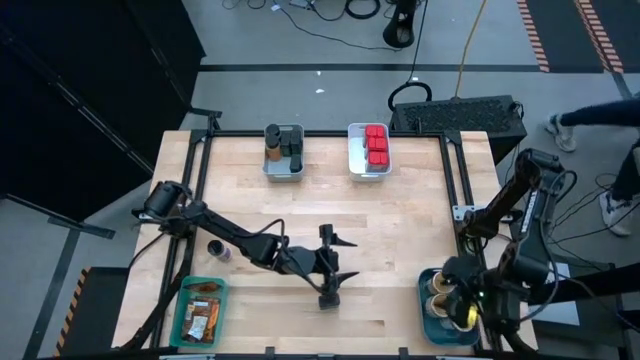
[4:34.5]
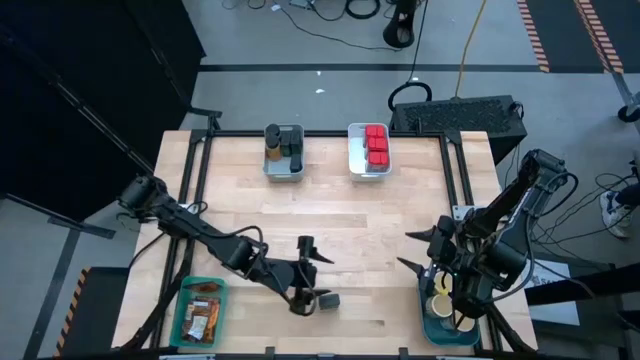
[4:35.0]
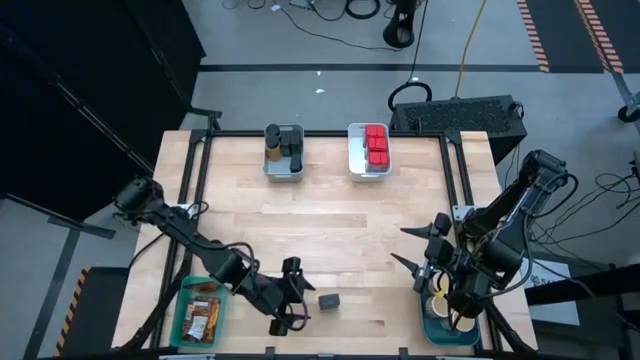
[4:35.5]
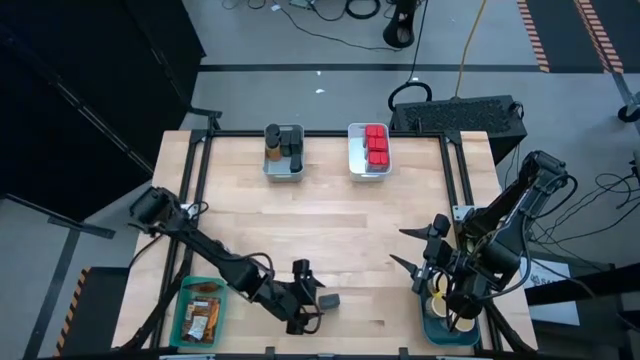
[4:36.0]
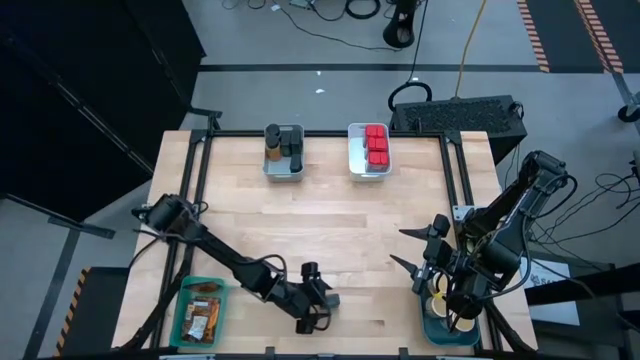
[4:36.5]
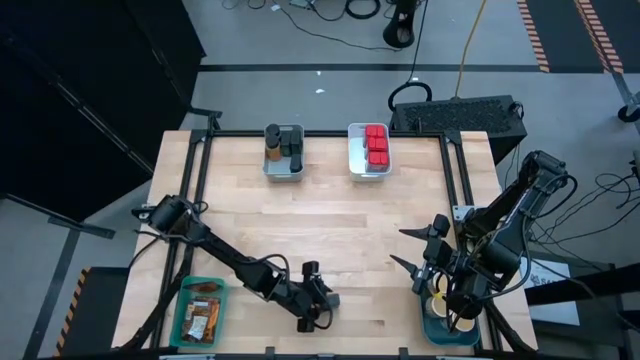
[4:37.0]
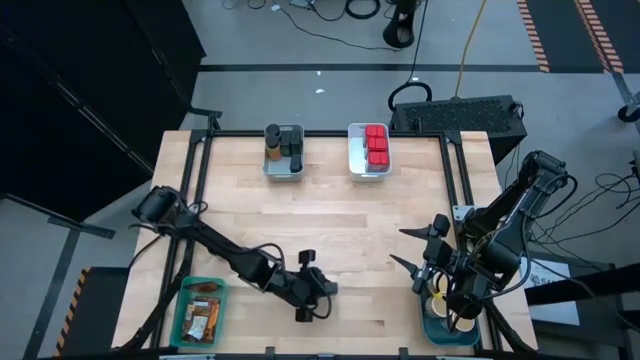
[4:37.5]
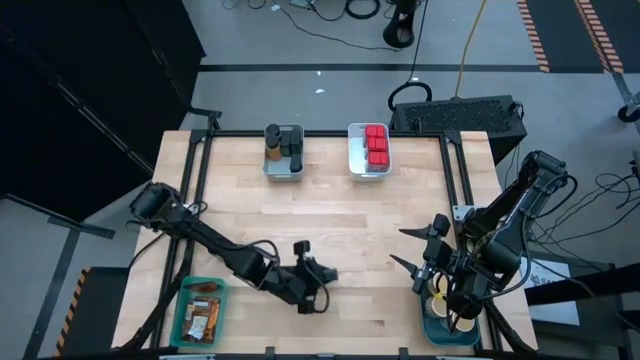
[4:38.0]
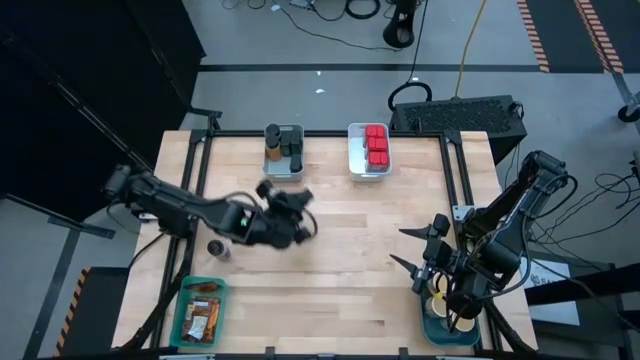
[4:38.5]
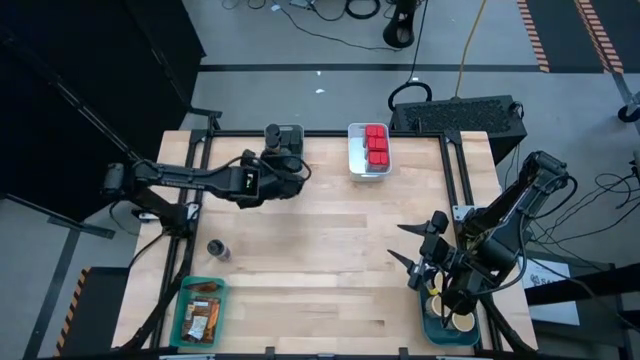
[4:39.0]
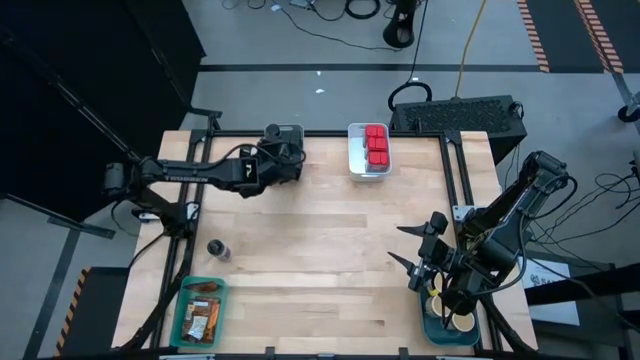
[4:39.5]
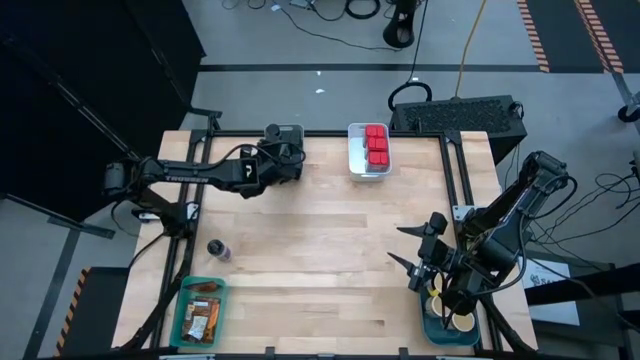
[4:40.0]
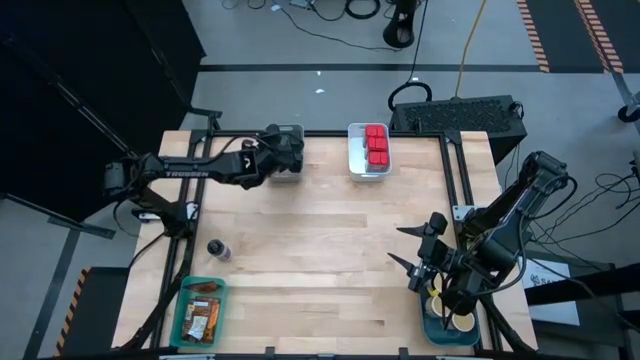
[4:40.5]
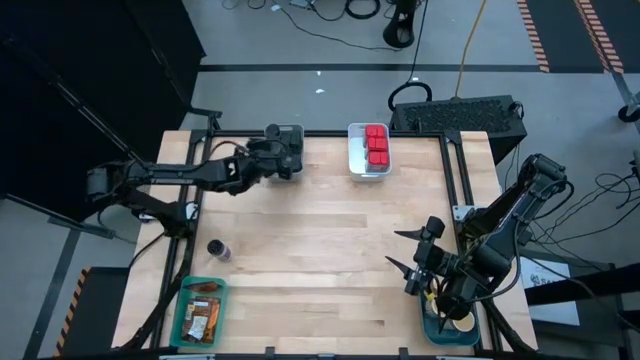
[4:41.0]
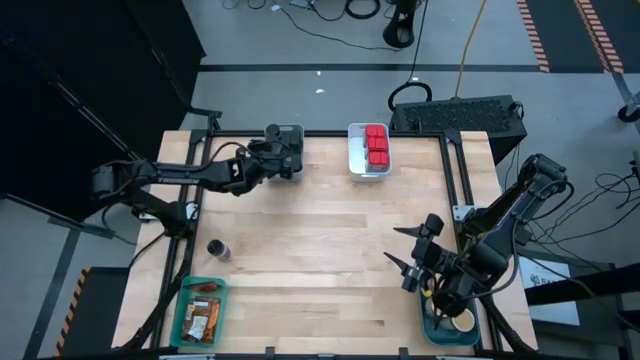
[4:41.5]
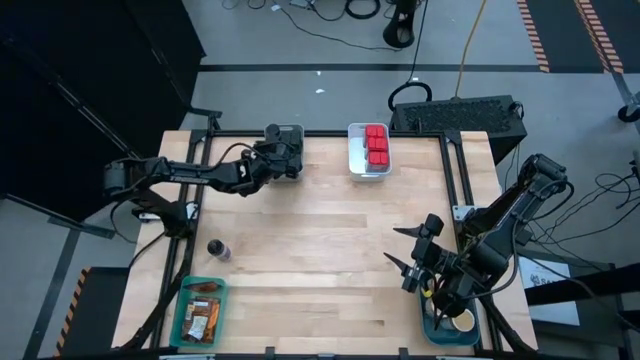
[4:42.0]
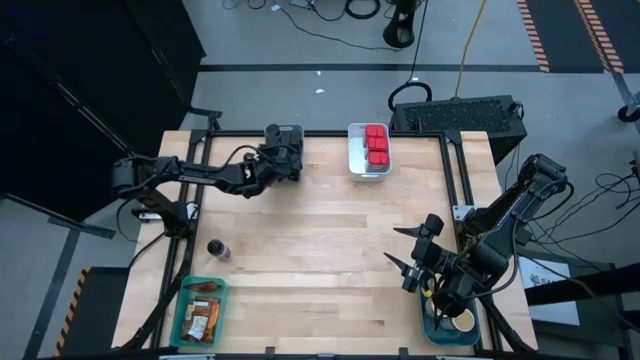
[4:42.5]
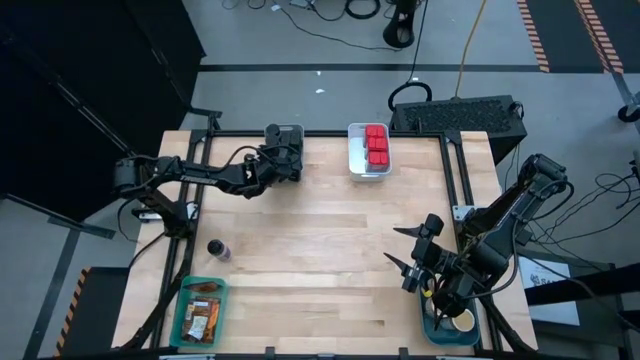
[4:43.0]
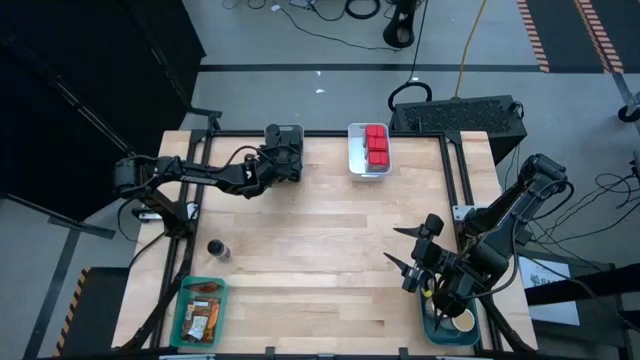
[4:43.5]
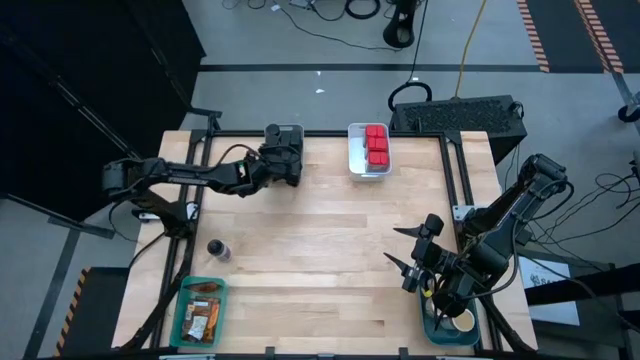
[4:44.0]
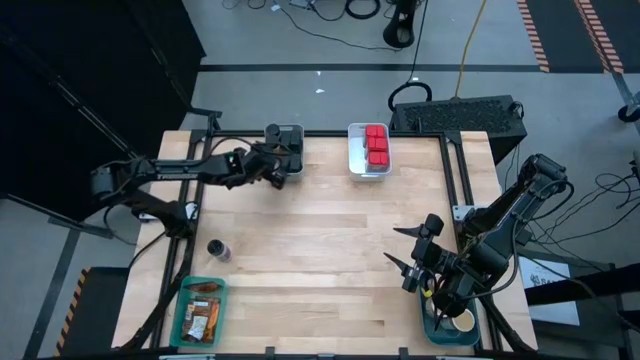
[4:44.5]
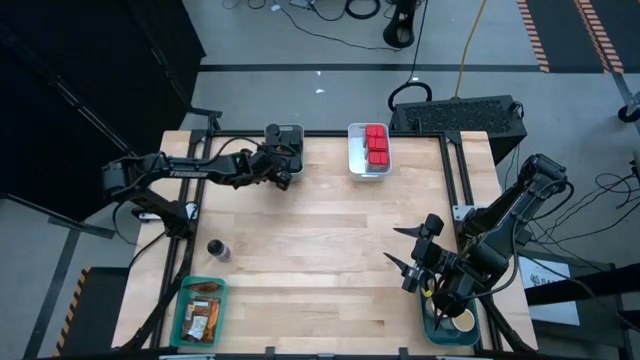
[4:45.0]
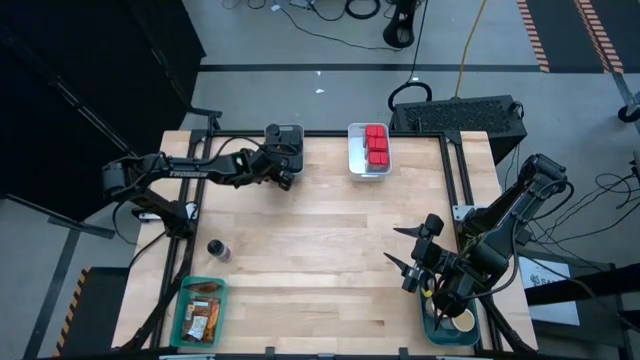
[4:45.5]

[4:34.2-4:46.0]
Task: Sort spices by type
Put the black spice can into the gray bin

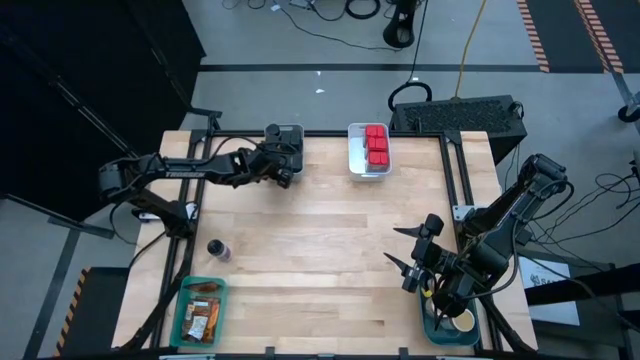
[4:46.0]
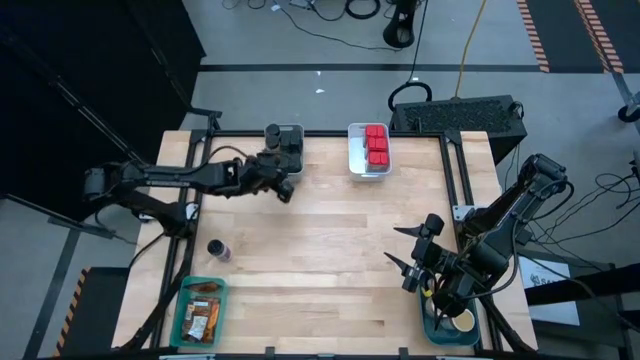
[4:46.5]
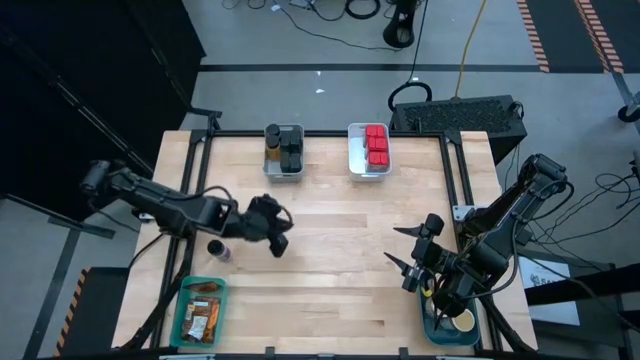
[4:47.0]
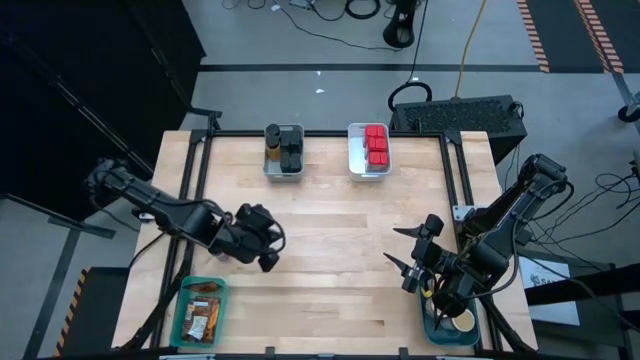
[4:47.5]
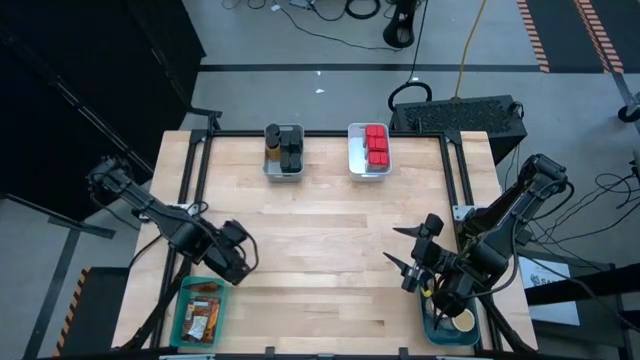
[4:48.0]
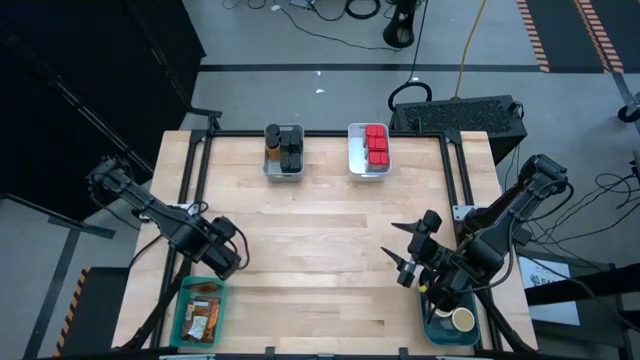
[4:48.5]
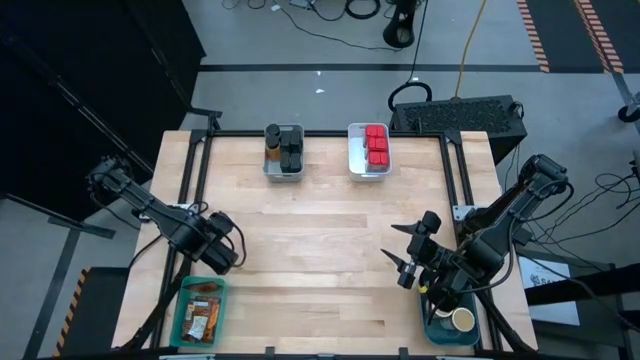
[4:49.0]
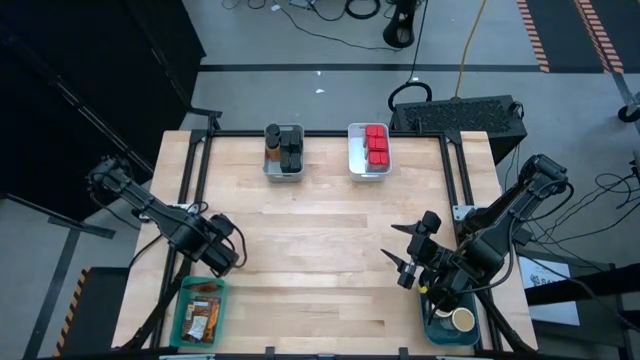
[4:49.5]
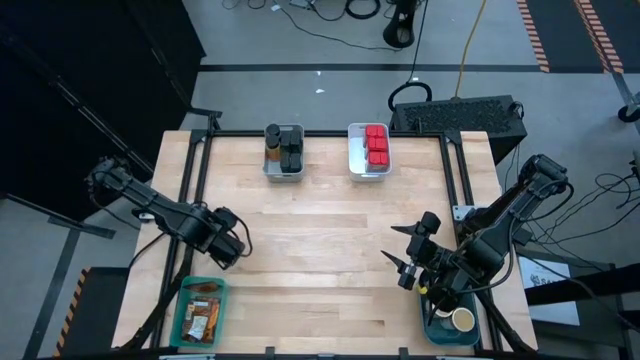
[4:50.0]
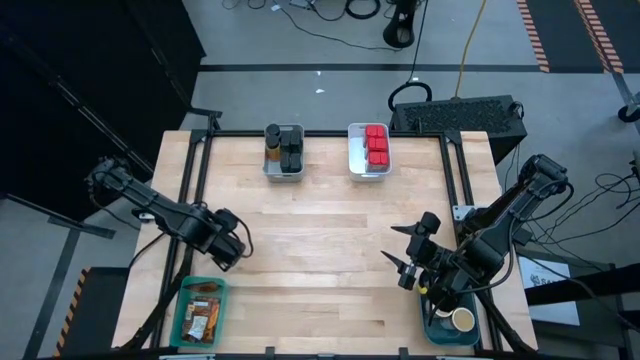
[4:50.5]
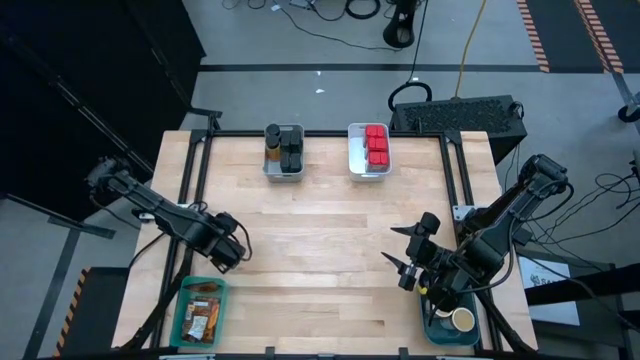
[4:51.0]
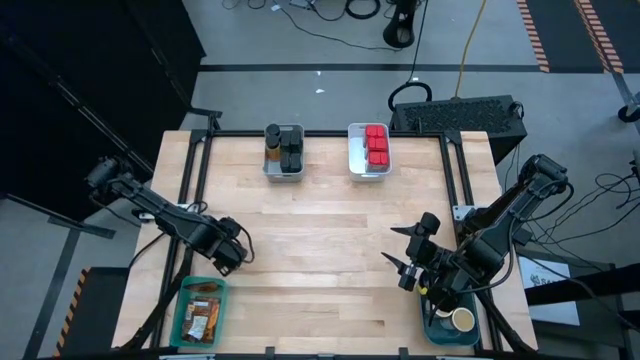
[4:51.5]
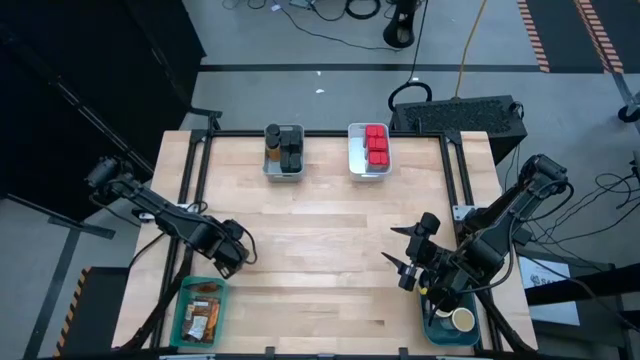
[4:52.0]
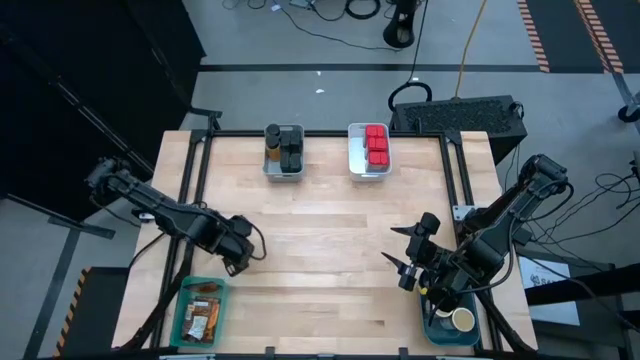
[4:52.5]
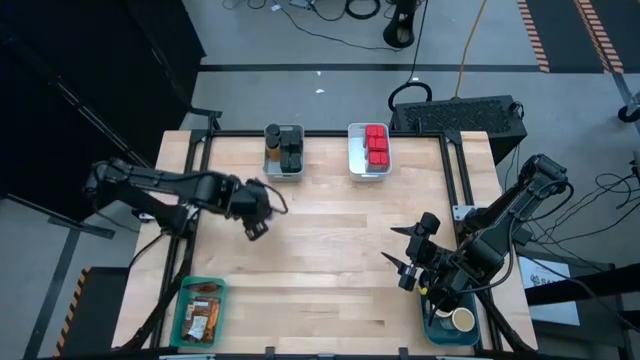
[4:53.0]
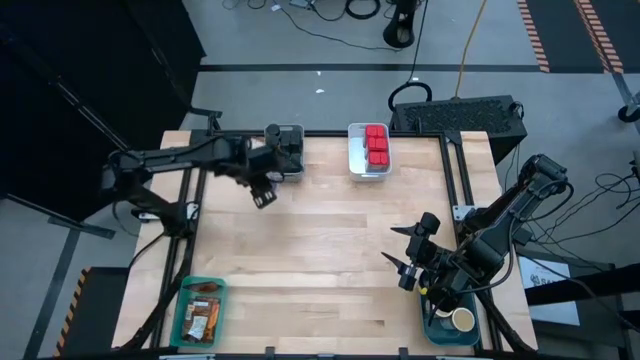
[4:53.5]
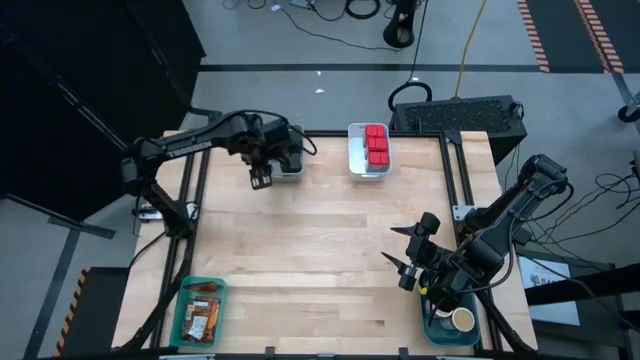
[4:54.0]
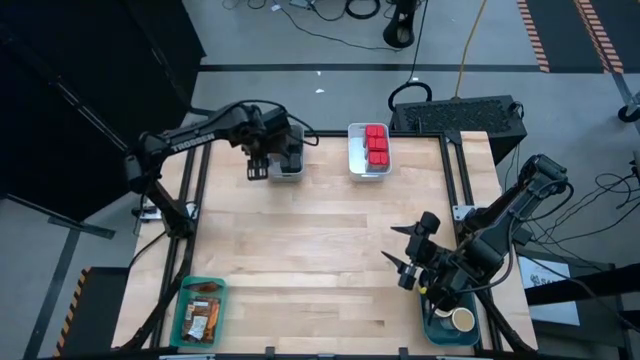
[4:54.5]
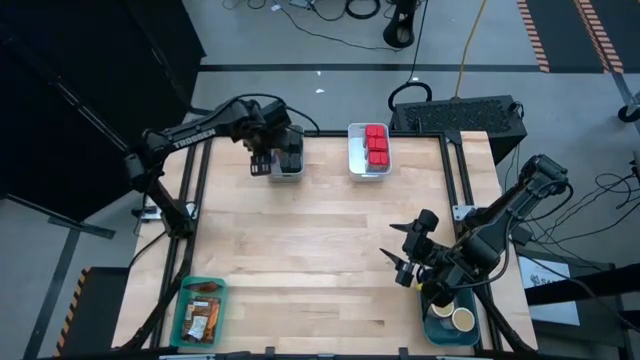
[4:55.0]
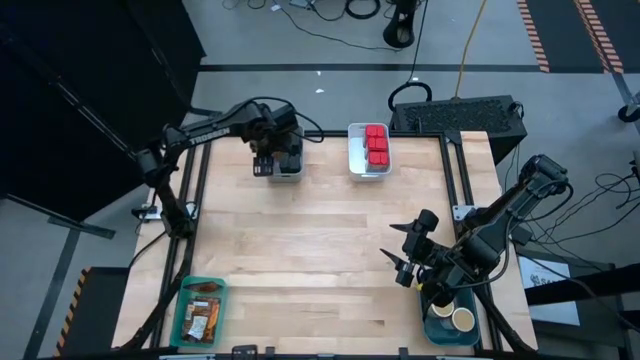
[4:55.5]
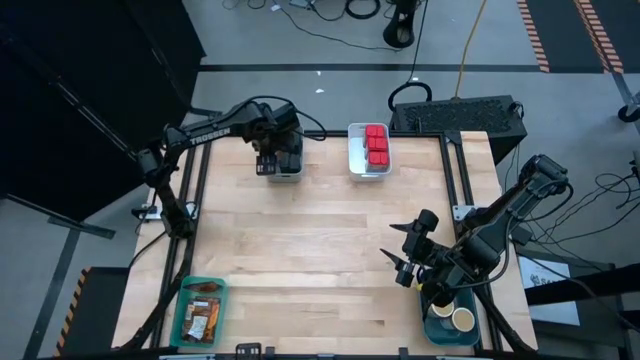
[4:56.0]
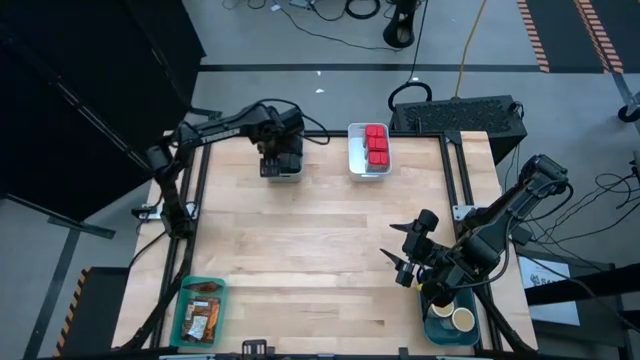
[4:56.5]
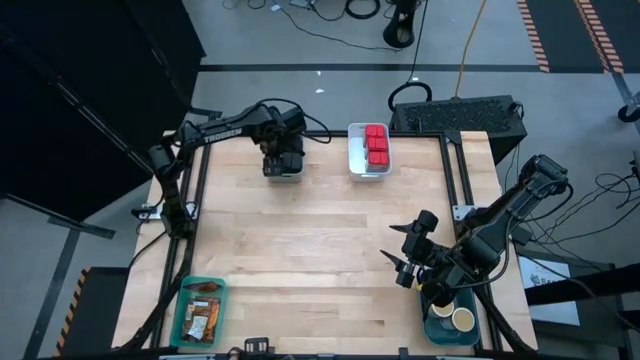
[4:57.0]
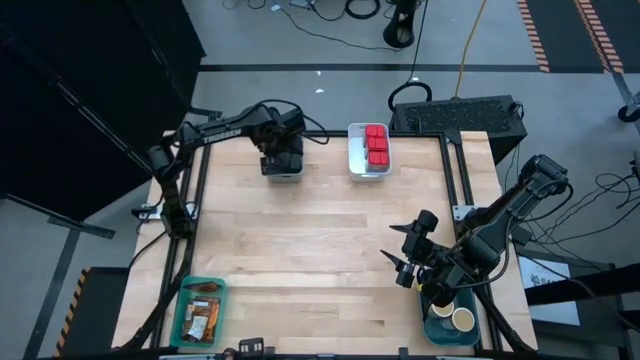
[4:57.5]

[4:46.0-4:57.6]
Put the black spice bottle into the gray bin
